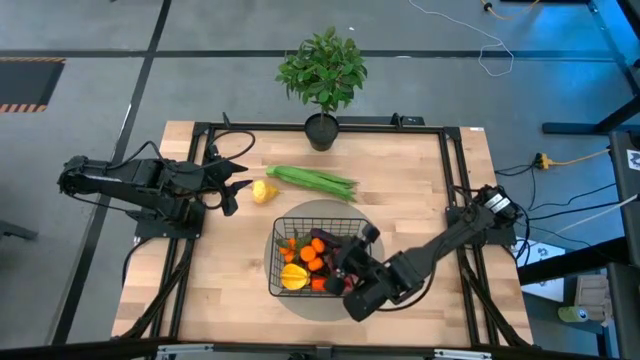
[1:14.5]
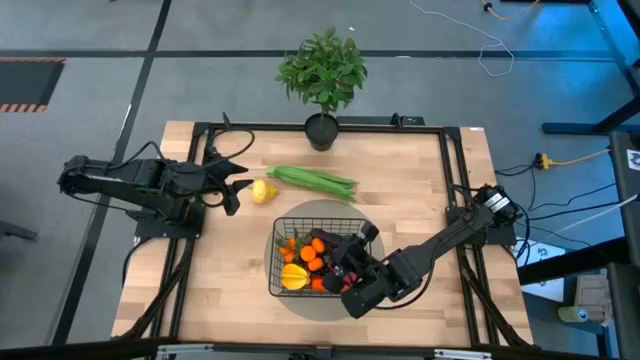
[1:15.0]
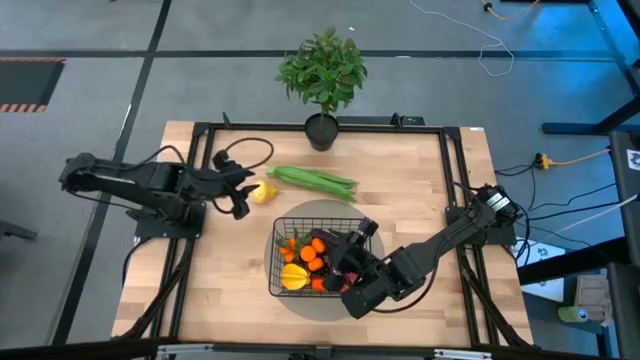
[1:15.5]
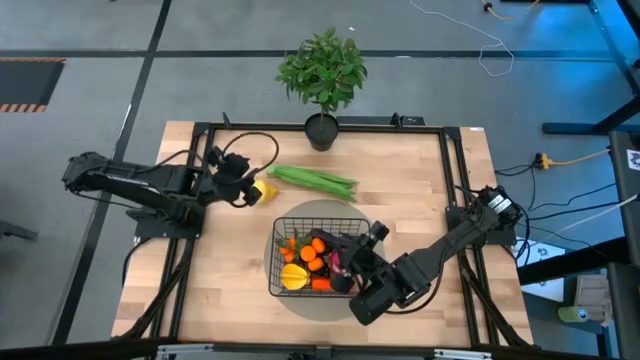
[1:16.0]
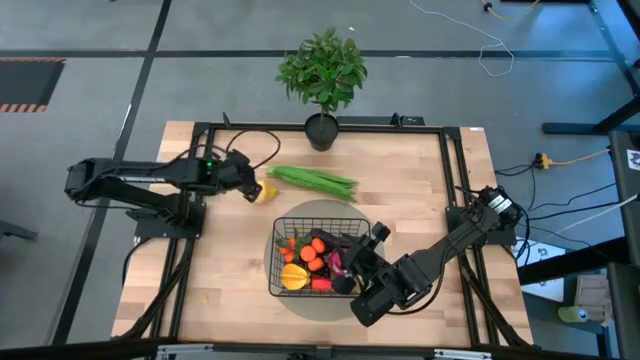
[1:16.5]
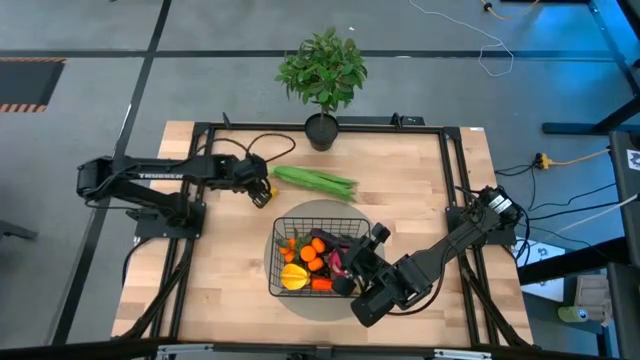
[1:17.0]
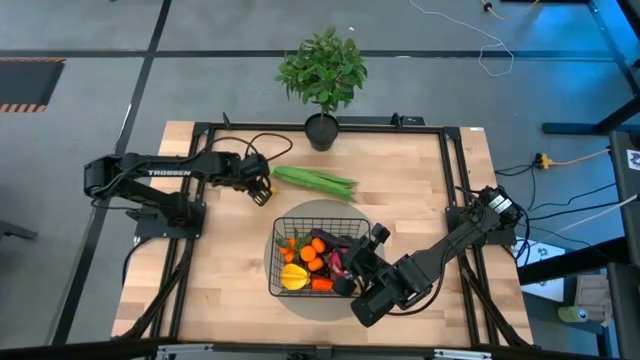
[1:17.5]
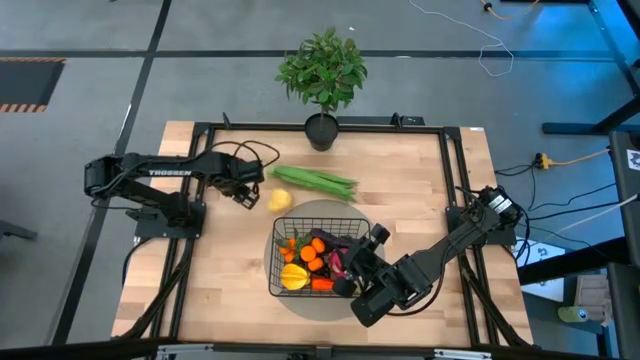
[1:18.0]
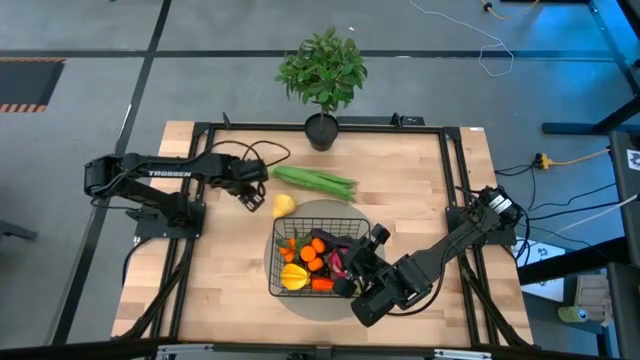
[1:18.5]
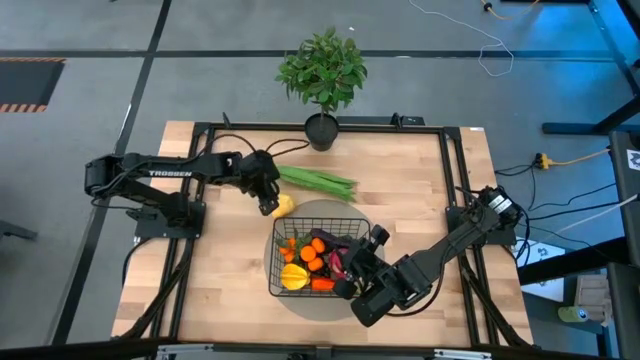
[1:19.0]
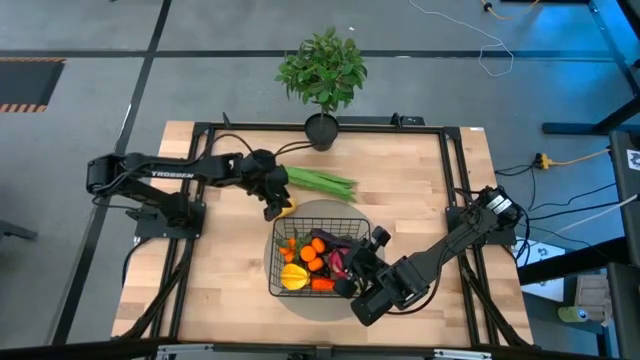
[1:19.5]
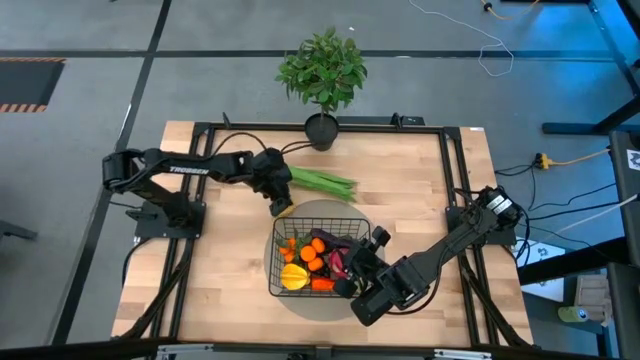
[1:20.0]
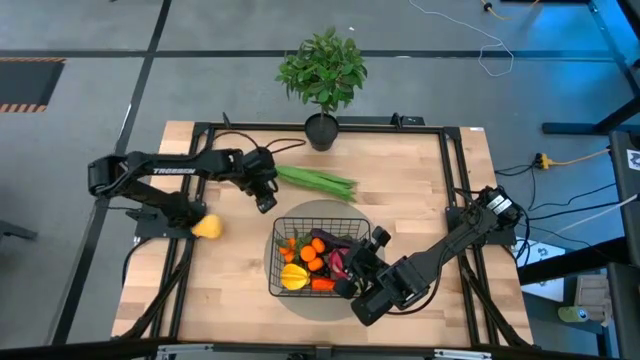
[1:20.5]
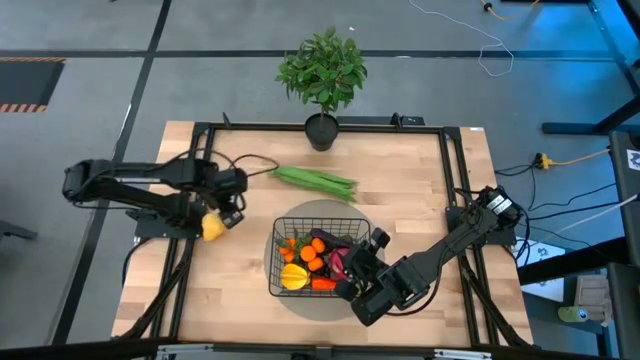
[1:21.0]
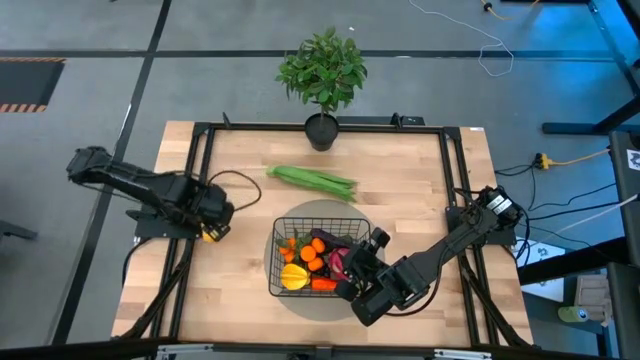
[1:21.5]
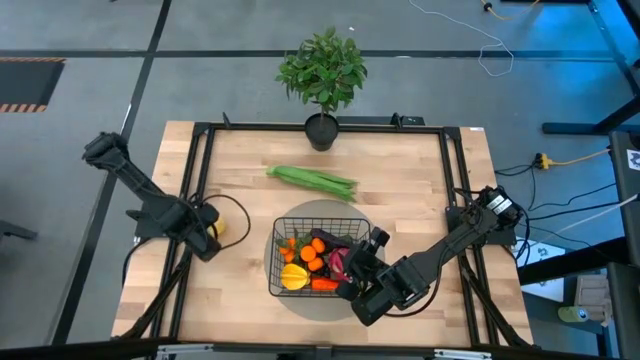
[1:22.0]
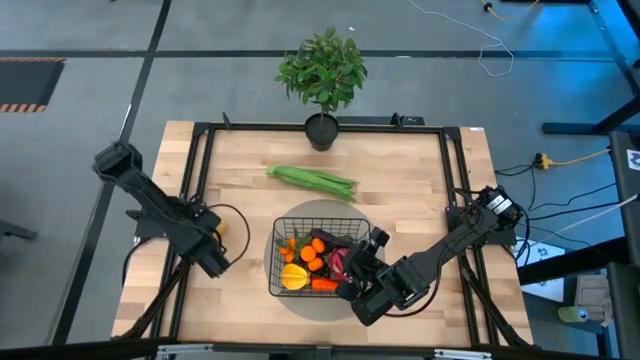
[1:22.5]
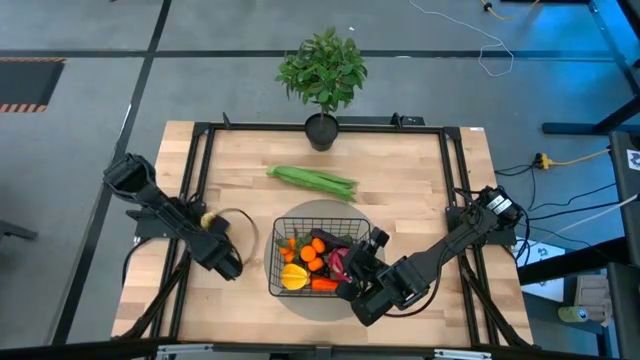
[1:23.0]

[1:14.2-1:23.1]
Task: Build produce basket
Put the pear into the black wire basket

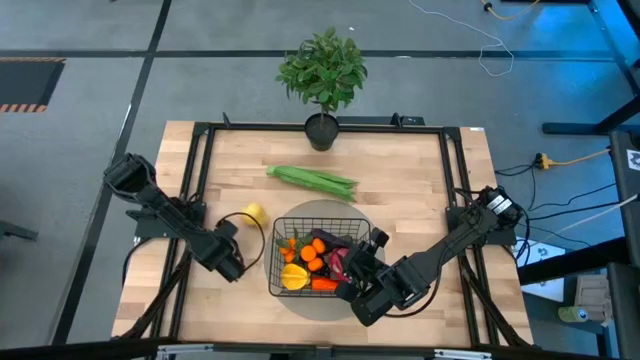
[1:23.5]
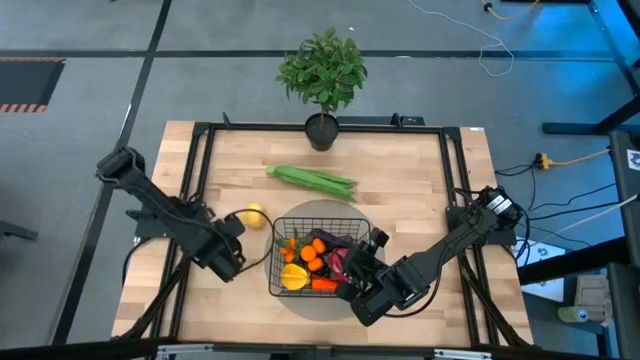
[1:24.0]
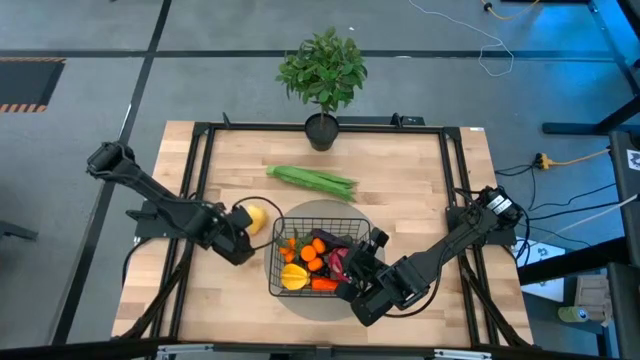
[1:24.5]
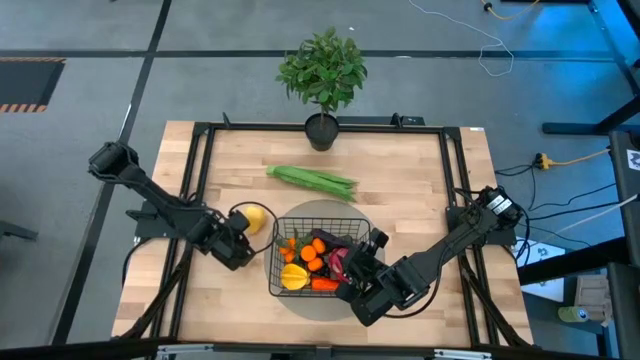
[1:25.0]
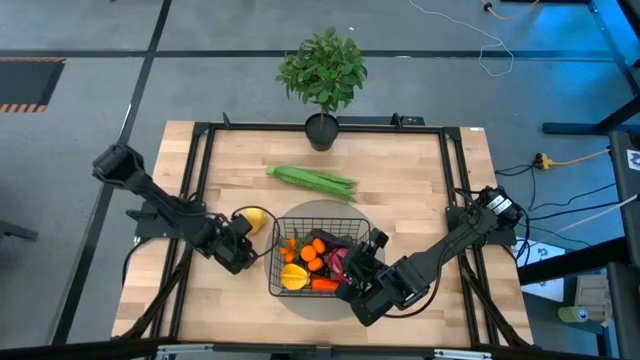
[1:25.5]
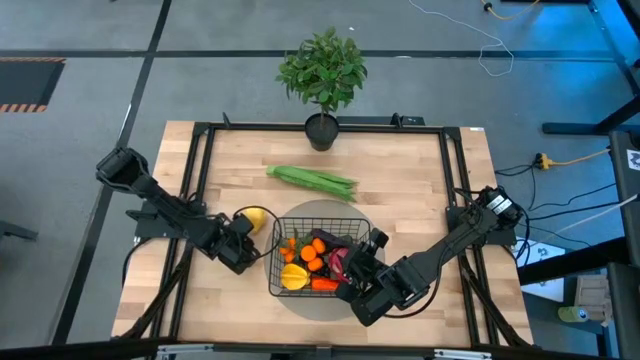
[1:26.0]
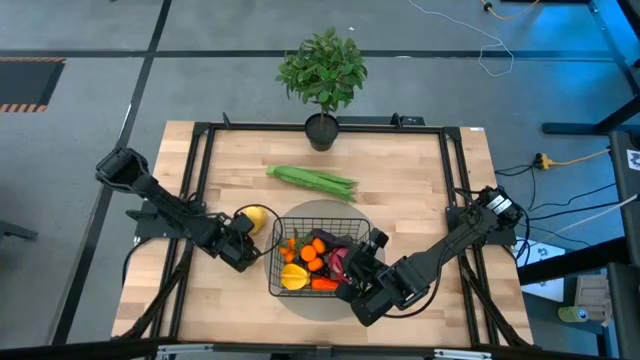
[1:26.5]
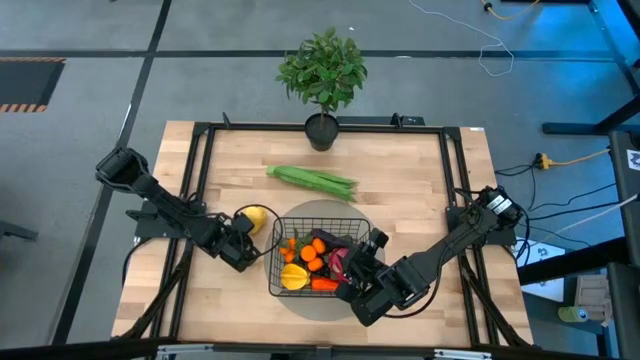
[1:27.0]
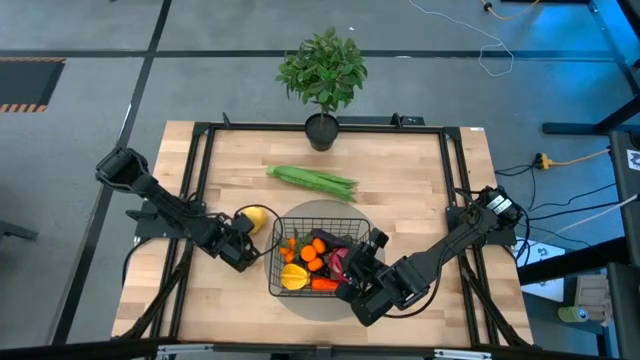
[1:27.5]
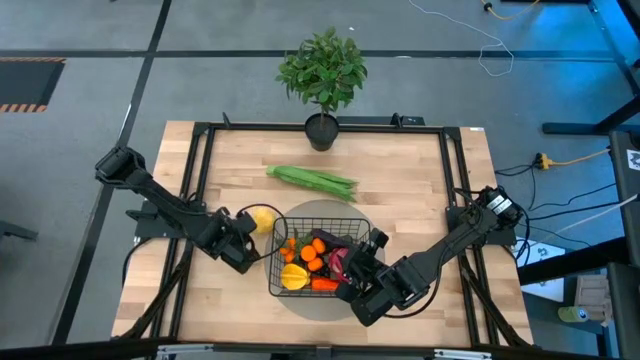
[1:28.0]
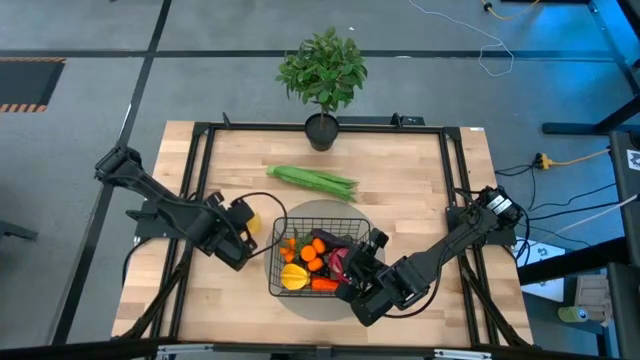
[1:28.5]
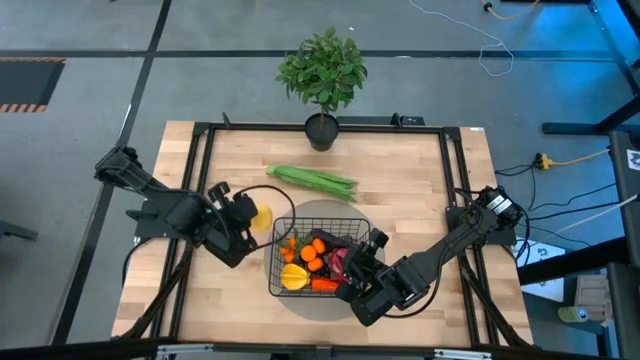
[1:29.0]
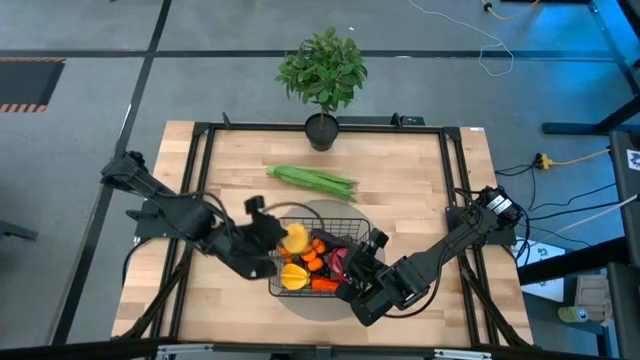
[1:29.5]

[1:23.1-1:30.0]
Put the pear into the black wire basket

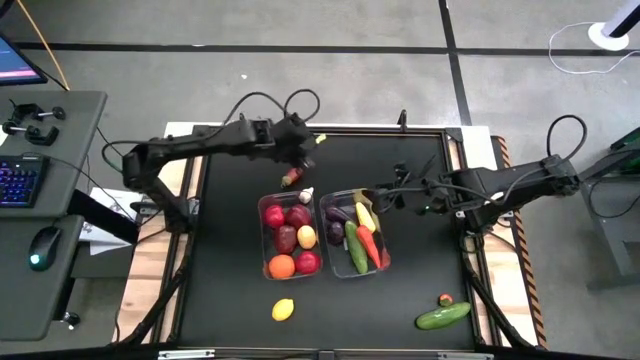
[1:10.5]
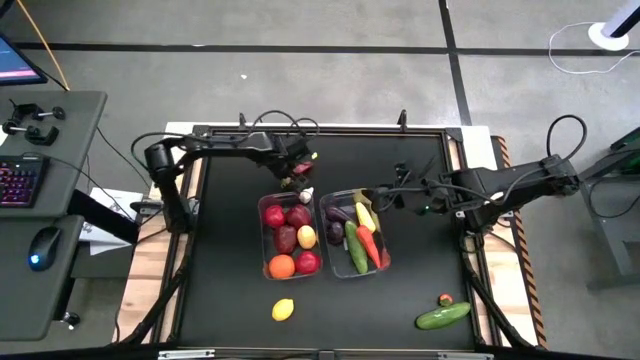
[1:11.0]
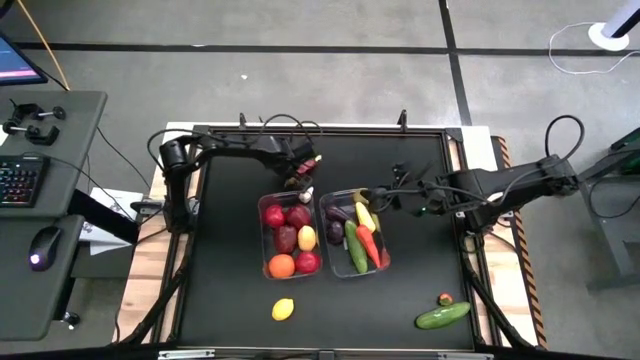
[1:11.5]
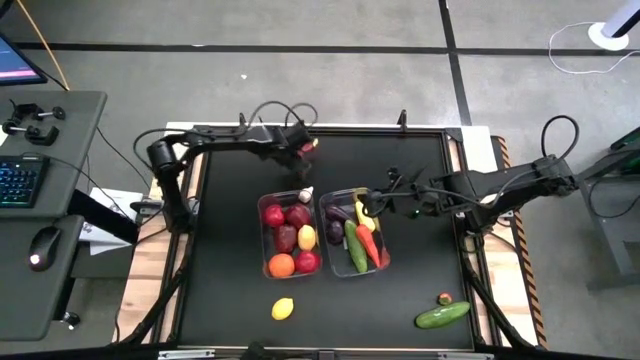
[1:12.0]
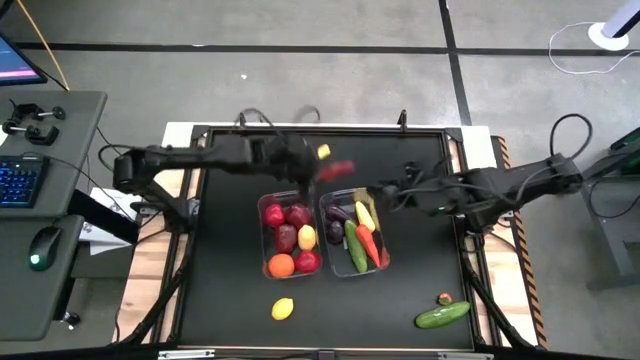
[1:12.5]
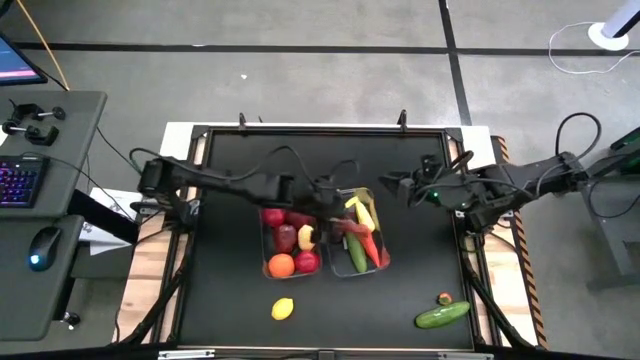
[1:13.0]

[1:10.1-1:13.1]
Task: Sort produce into baskets
Put the chili pepper into the right transparent bin

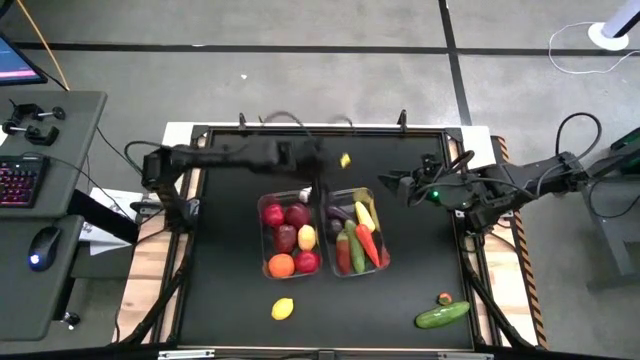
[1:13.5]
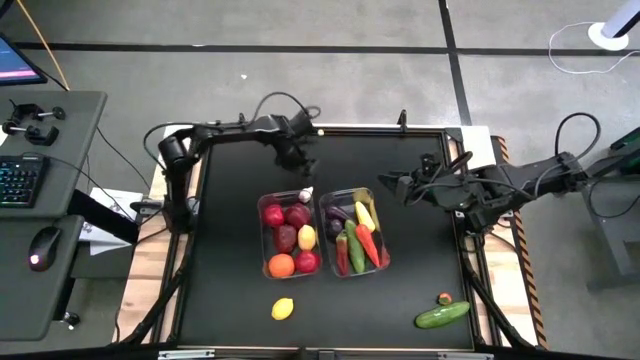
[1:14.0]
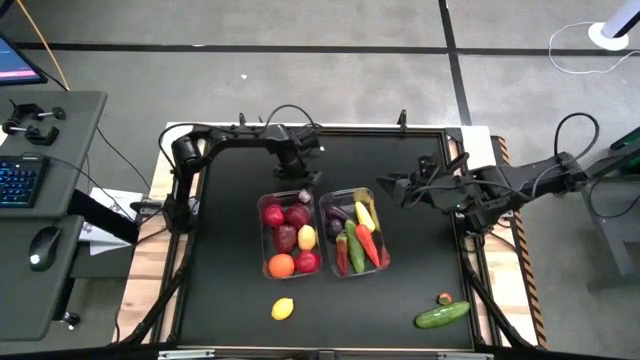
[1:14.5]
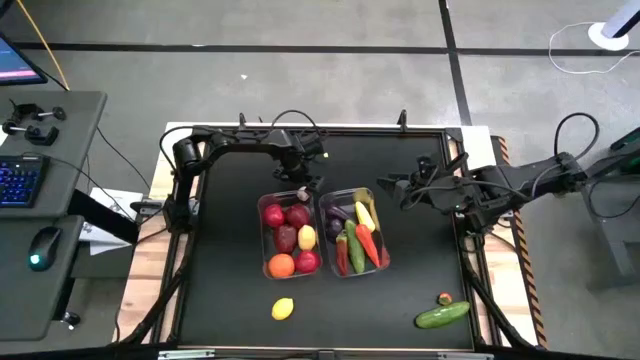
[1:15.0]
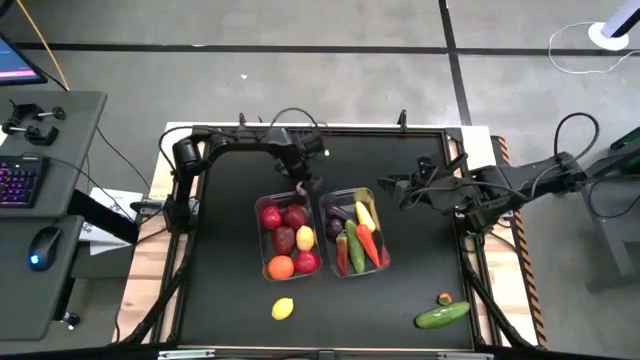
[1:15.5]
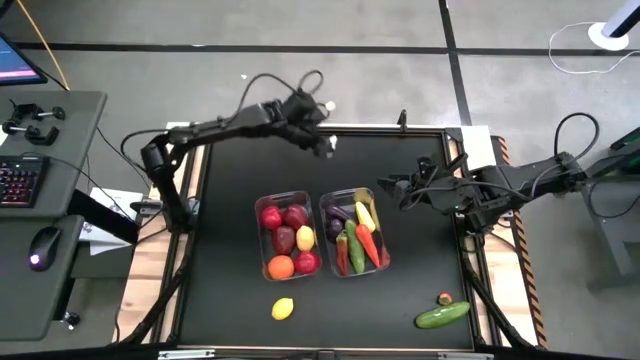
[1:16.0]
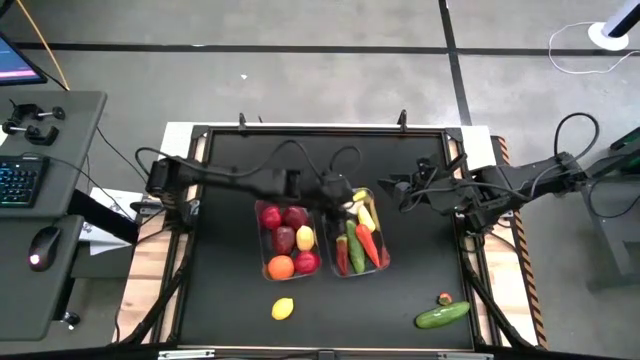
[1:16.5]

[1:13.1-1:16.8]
Put the garlic into the right transparent bin
